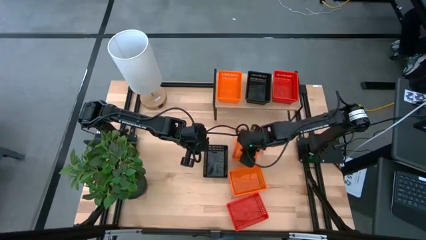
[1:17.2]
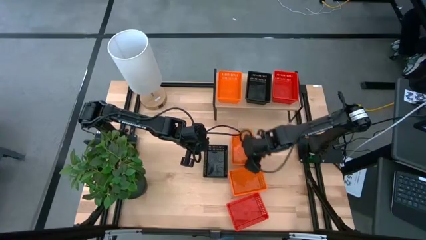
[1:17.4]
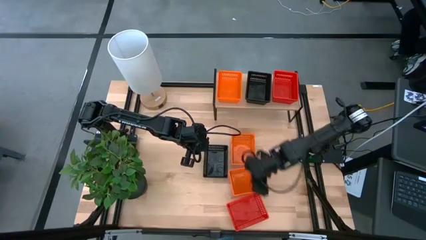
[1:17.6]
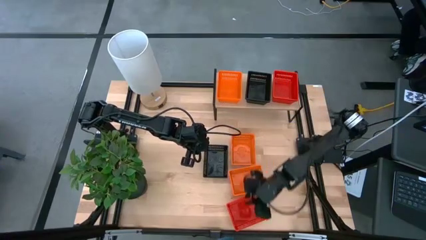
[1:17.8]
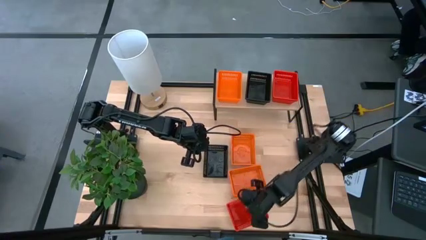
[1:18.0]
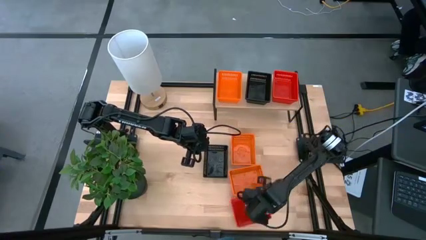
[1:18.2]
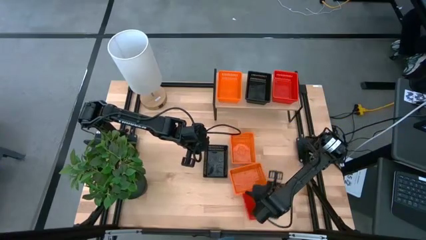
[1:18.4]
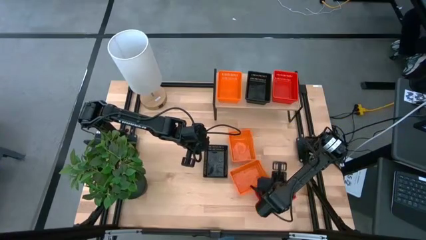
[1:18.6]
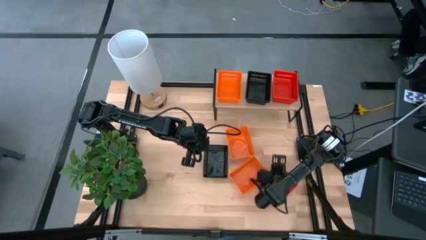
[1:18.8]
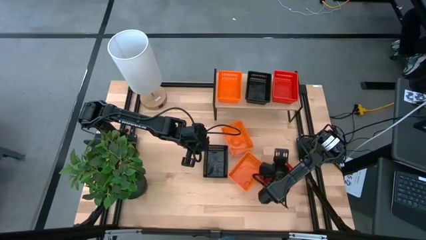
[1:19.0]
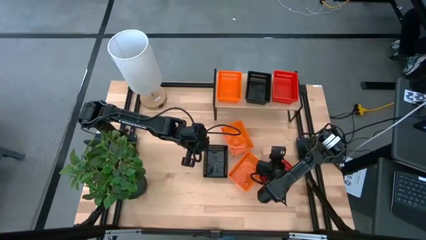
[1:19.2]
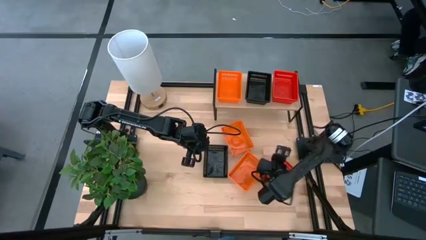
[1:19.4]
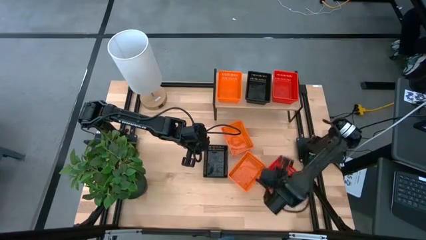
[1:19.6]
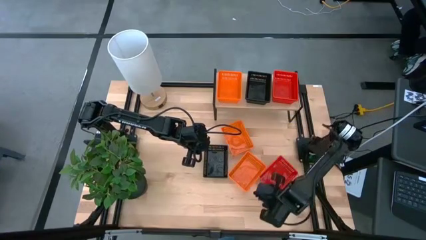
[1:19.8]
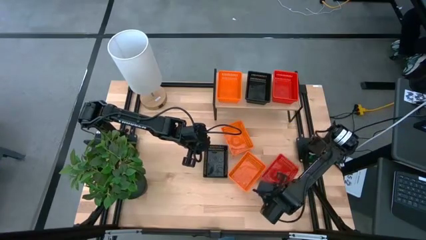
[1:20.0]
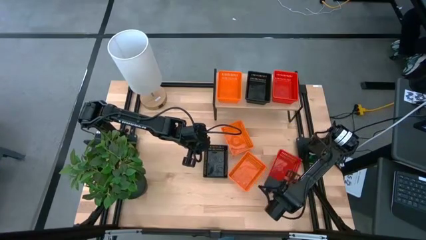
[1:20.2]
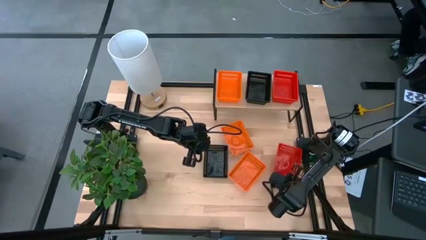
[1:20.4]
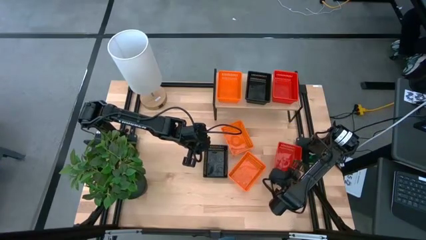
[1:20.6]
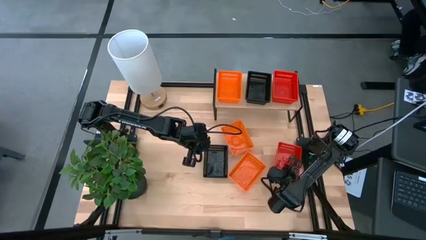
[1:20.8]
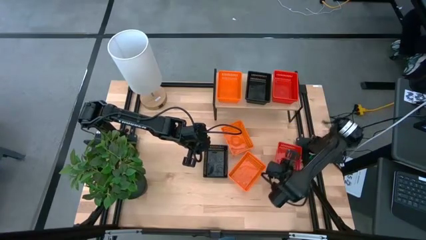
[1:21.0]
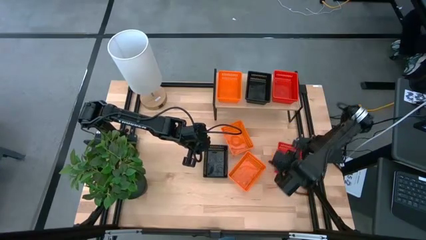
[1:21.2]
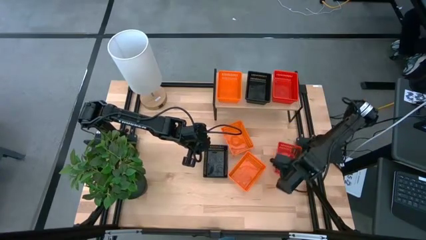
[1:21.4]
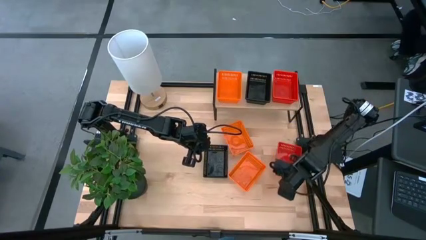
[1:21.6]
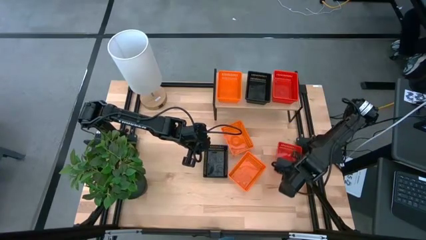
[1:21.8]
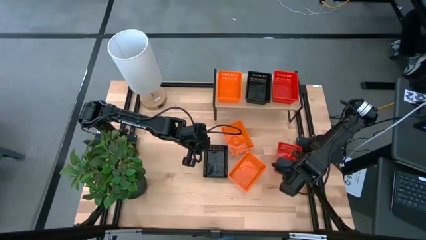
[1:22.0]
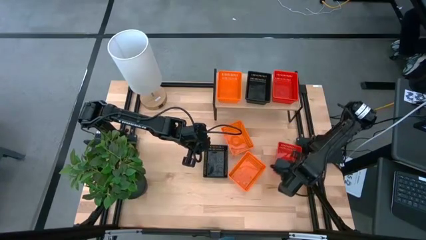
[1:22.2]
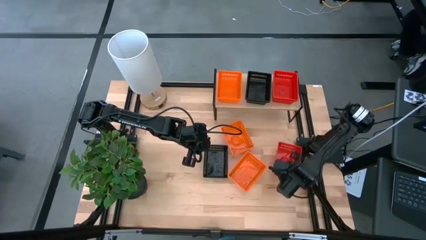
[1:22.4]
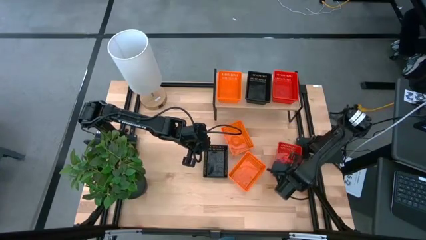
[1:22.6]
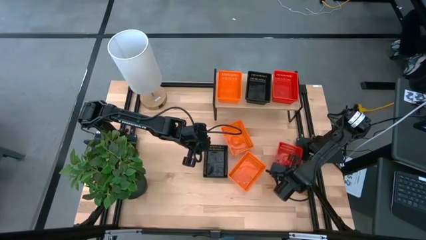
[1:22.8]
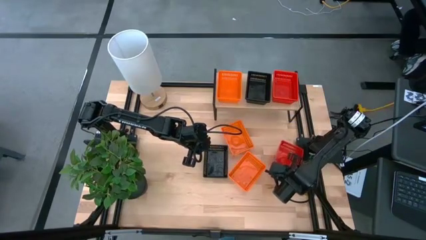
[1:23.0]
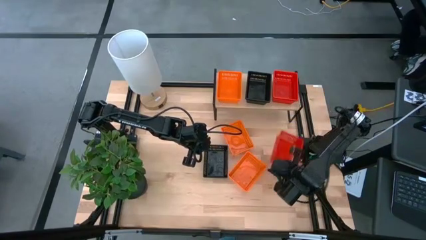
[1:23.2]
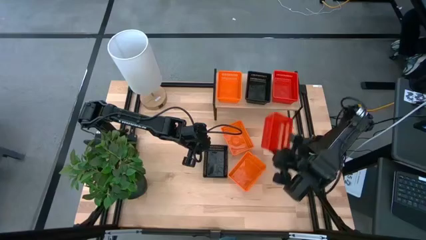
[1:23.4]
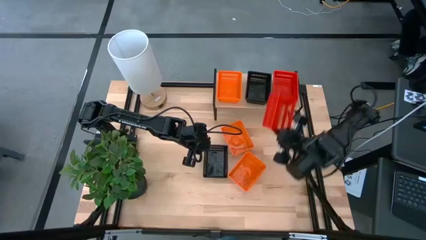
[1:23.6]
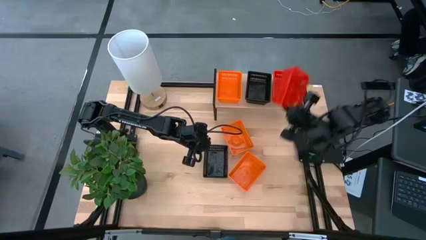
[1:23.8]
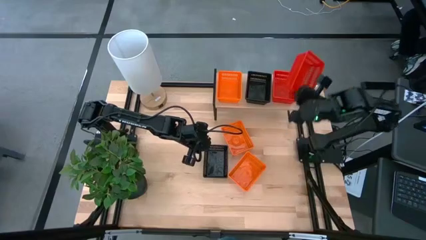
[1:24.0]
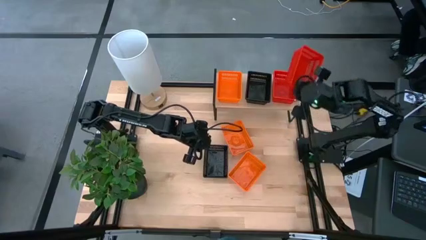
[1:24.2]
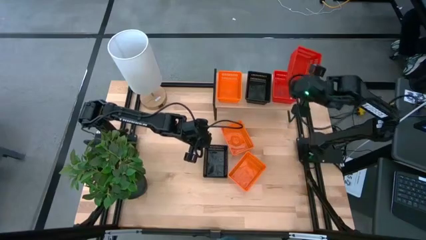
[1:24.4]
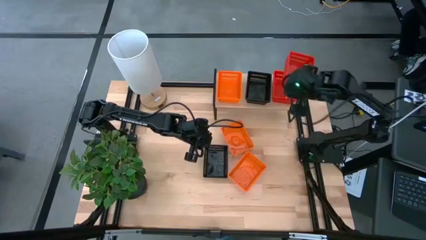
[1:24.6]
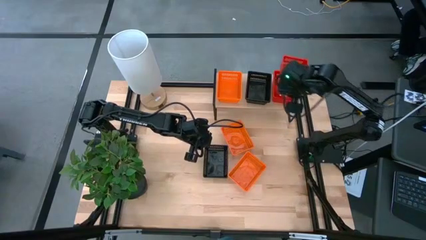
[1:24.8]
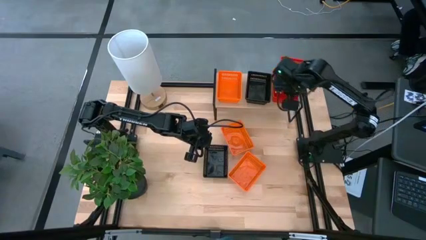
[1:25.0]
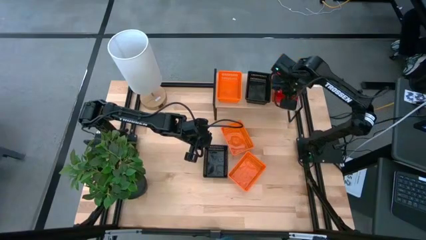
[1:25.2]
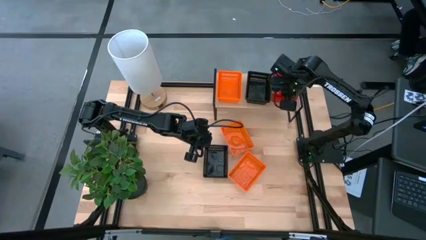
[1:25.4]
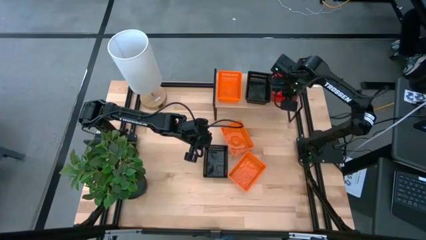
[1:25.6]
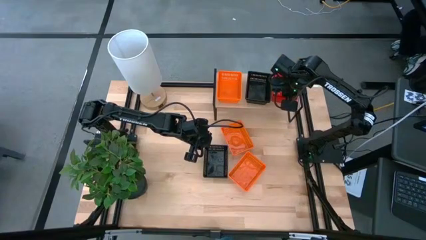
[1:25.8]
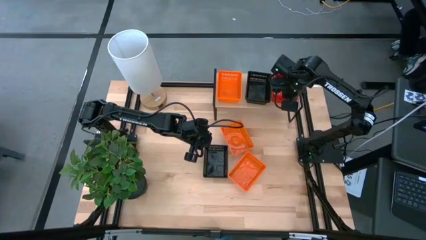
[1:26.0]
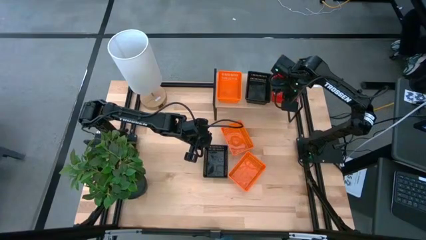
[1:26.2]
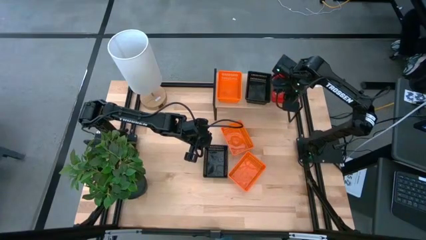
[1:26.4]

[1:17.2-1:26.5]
Task: Stack baskets on shelf by color
Stack the red bin on the red bin on the shelf

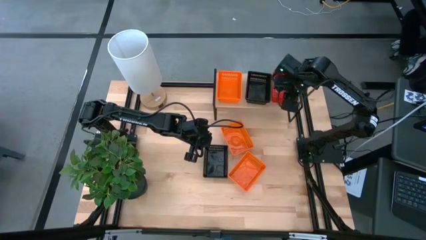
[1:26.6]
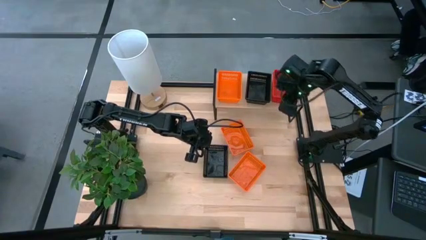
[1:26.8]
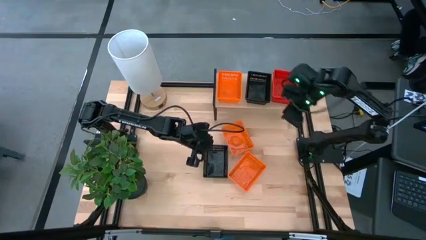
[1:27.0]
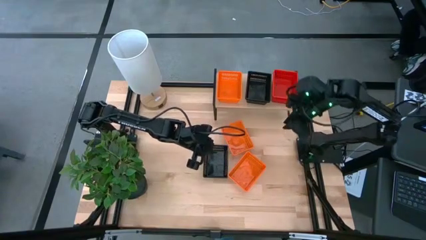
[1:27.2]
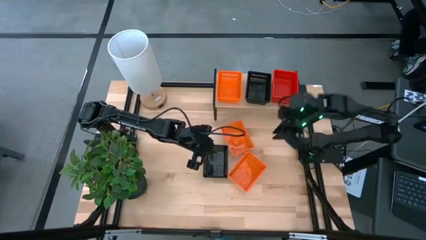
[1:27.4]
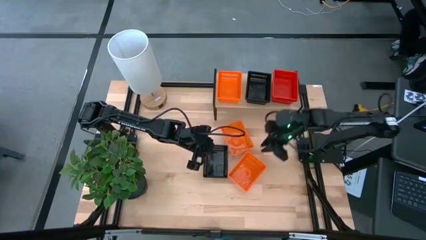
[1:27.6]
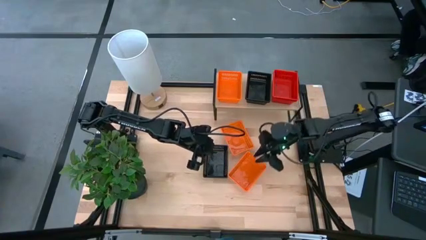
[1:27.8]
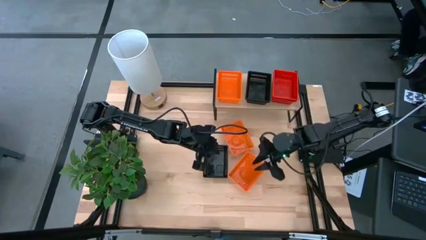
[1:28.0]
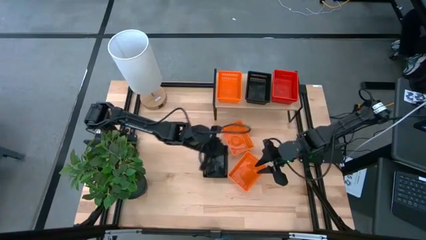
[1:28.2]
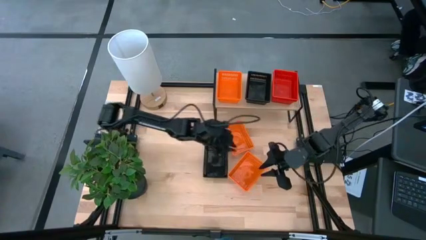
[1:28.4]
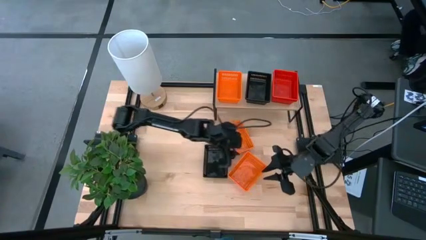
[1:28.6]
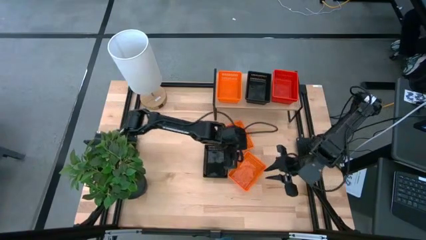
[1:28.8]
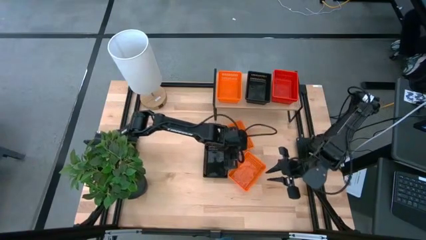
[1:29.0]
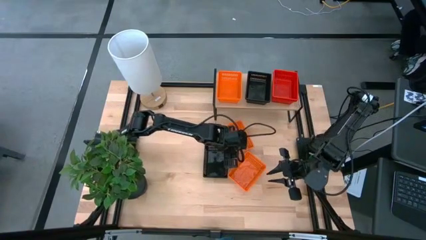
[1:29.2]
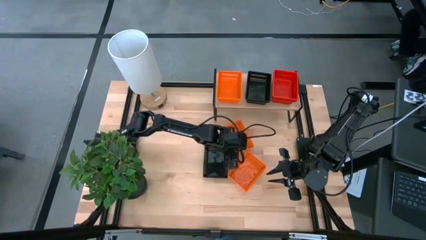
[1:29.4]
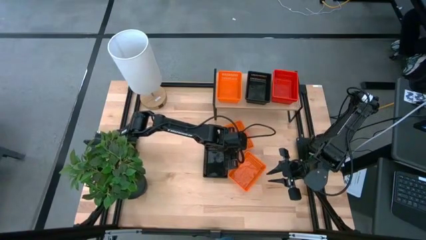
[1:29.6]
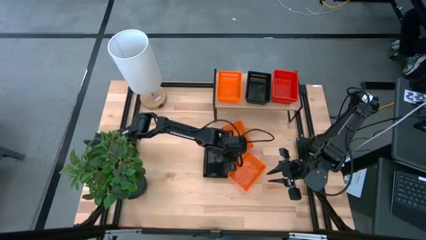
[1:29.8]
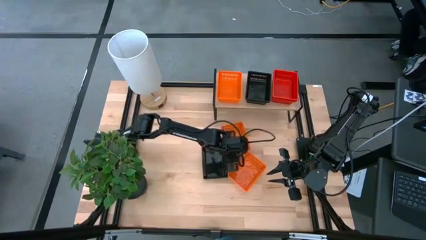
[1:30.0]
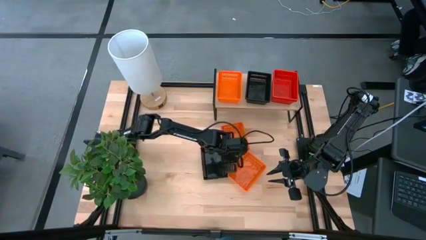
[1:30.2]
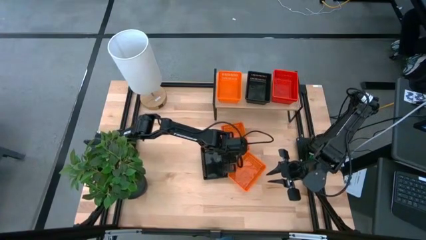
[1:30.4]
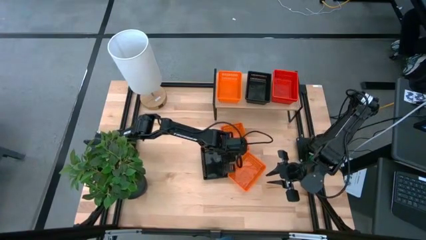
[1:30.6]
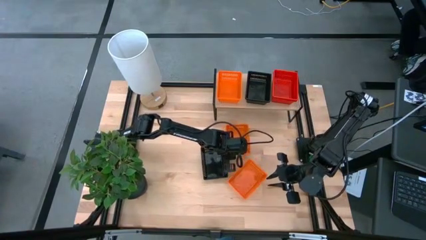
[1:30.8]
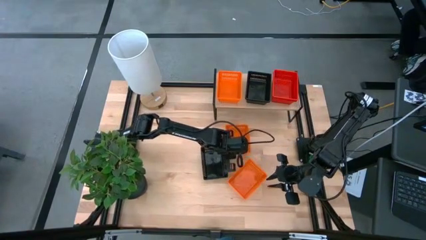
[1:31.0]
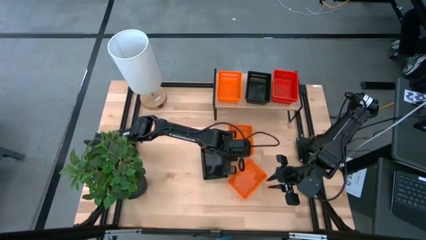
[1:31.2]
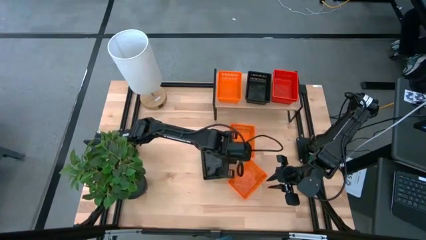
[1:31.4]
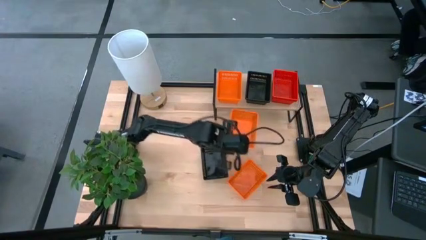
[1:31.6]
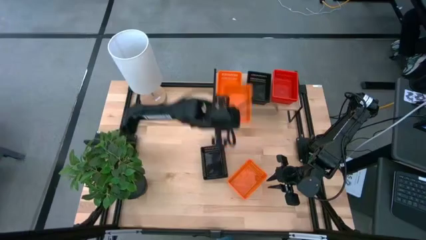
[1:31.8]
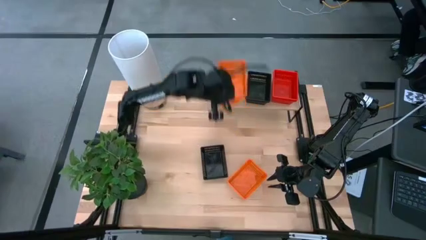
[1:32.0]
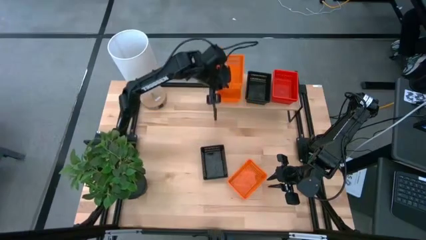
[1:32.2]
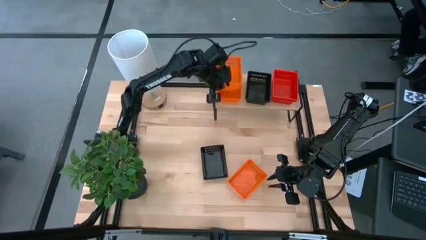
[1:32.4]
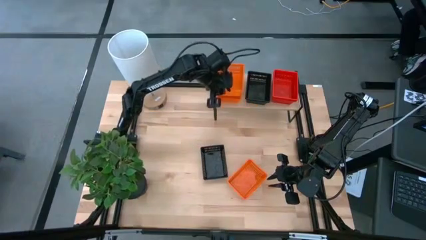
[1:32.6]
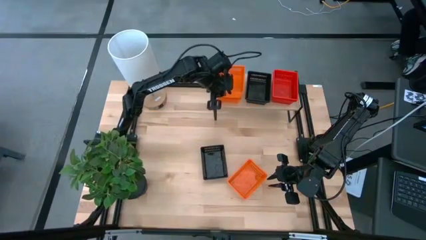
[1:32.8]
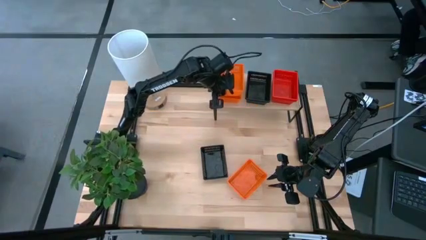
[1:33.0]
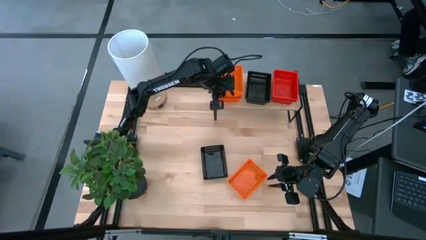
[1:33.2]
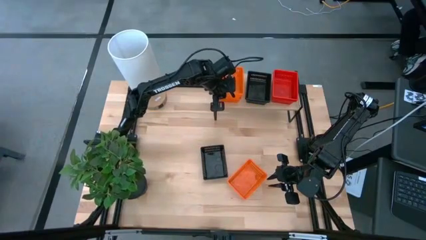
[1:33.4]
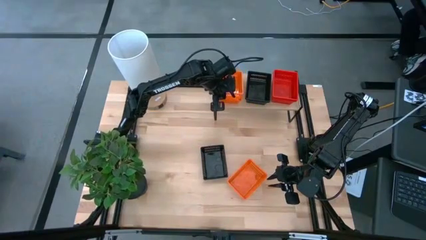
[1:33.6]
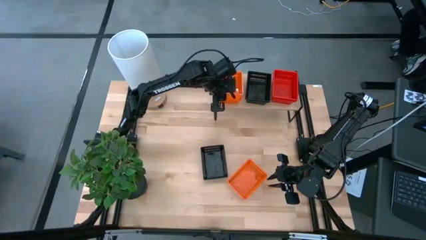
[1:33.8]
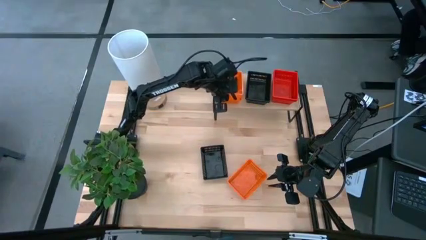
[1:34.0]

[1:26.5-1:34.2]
Stack the top orange bin on the orange bin on the shelf

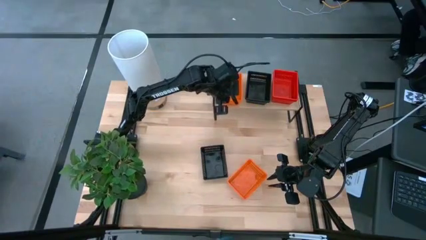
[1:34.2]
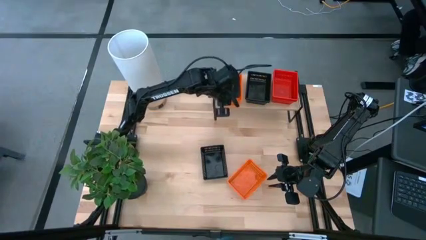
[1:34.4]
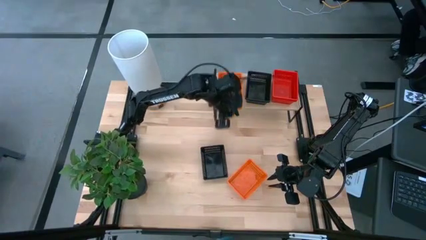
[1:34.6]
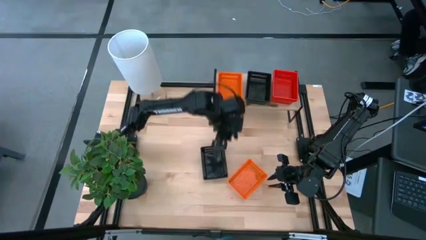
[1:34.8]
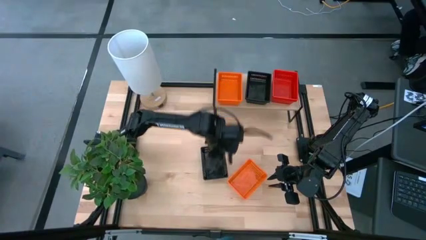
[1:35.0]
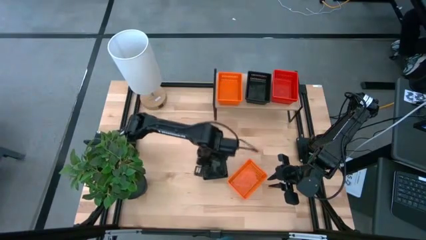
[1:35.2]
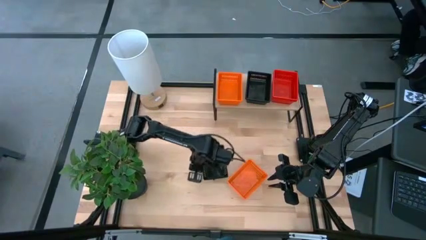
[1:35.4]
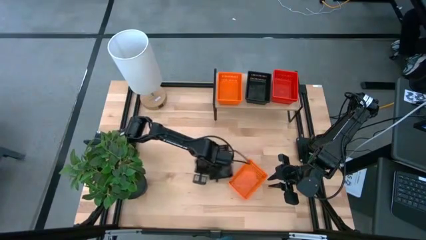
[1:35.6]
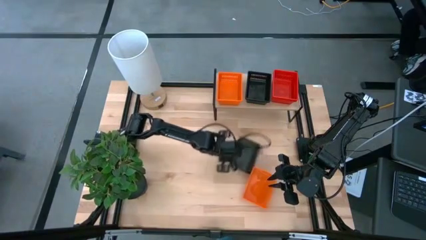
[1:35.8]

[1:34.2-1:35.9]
Adjust the black bin on the table
